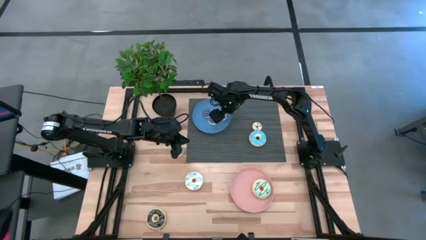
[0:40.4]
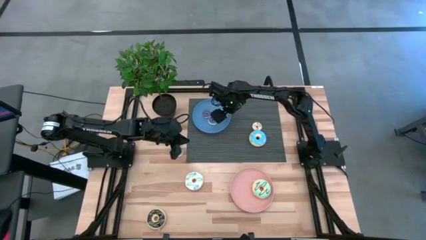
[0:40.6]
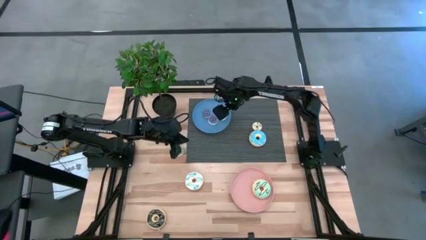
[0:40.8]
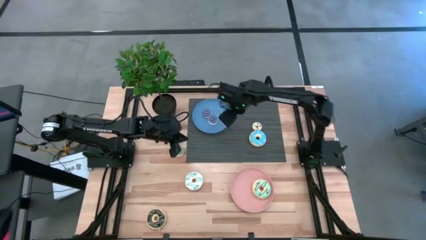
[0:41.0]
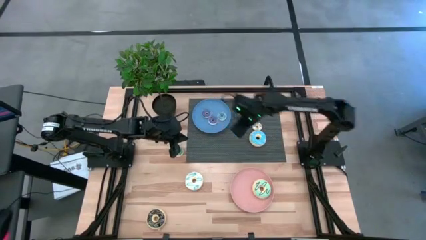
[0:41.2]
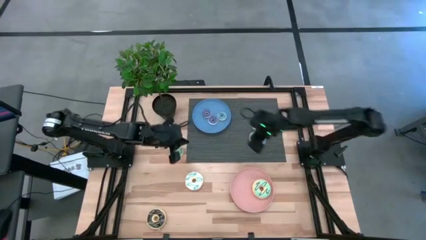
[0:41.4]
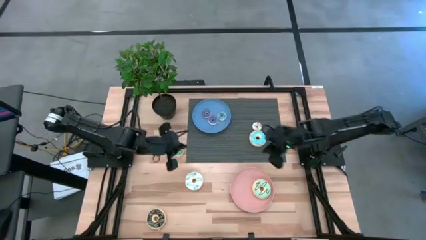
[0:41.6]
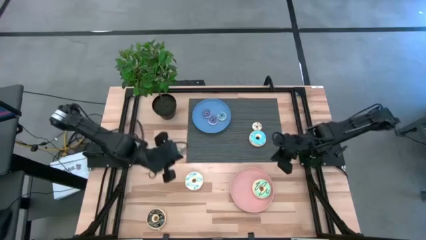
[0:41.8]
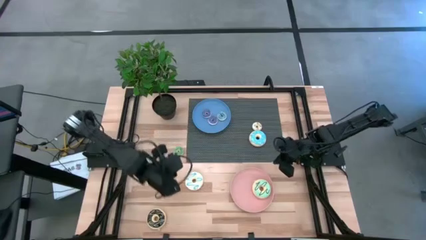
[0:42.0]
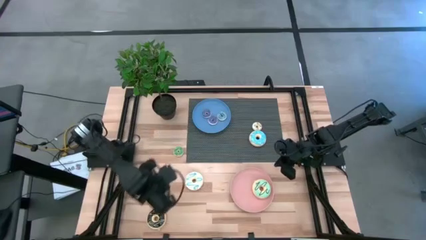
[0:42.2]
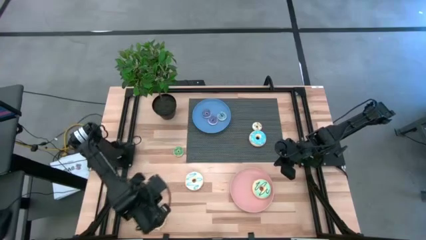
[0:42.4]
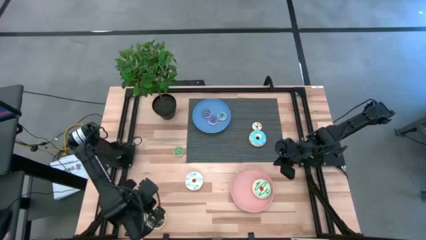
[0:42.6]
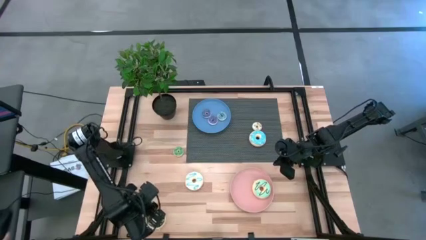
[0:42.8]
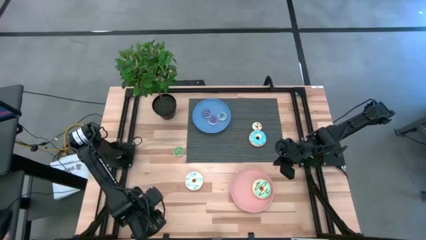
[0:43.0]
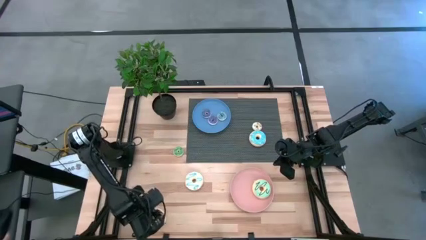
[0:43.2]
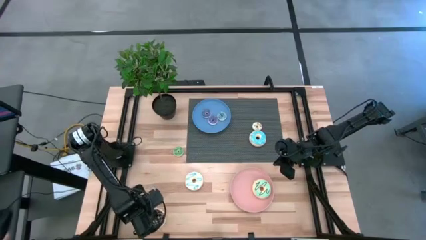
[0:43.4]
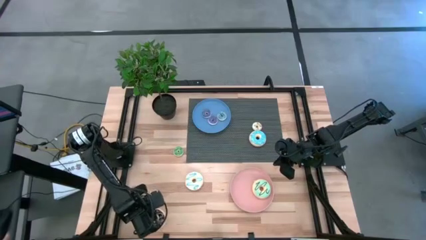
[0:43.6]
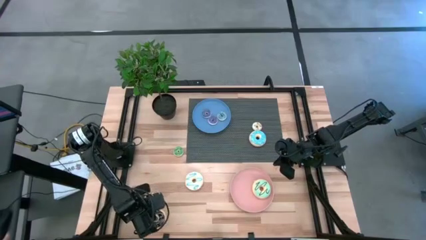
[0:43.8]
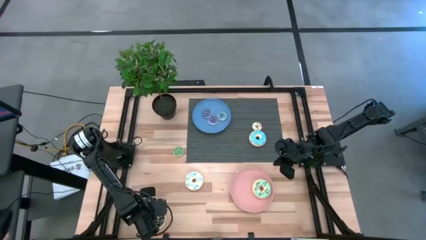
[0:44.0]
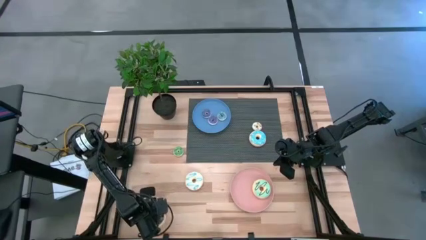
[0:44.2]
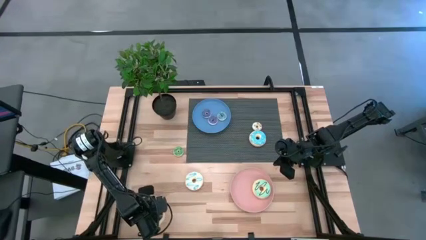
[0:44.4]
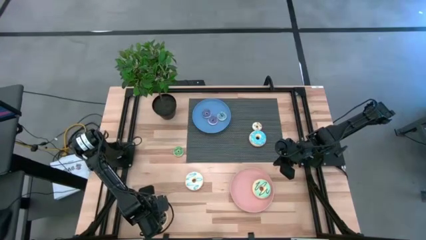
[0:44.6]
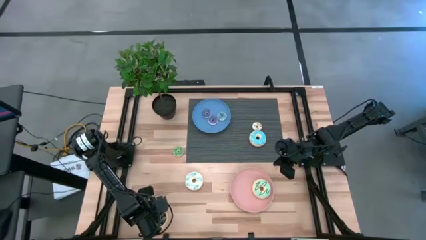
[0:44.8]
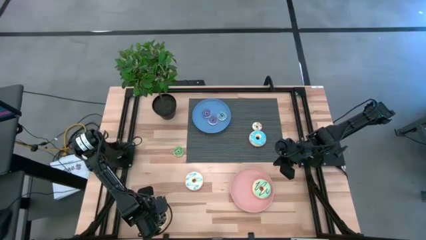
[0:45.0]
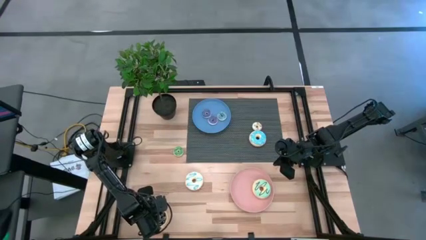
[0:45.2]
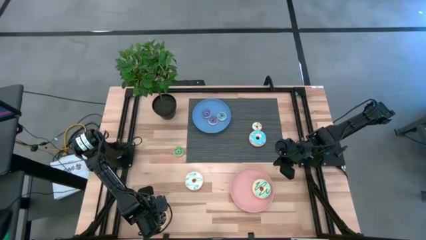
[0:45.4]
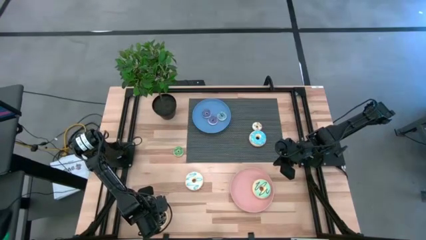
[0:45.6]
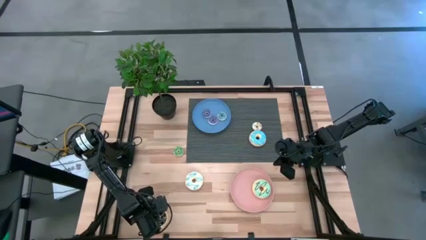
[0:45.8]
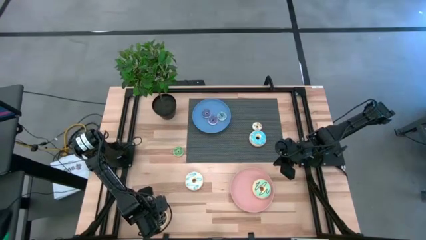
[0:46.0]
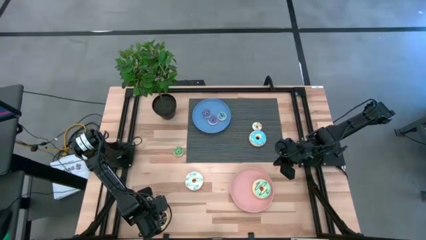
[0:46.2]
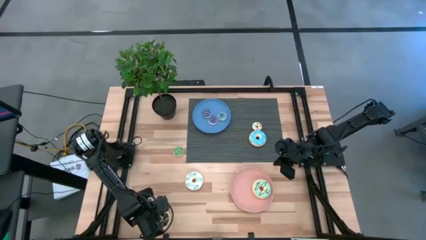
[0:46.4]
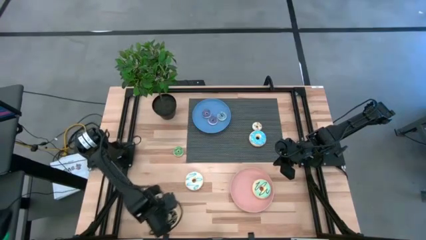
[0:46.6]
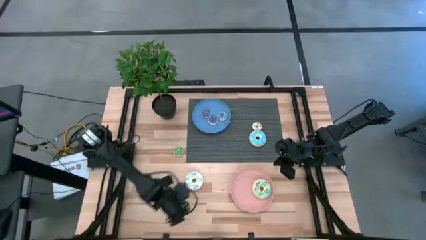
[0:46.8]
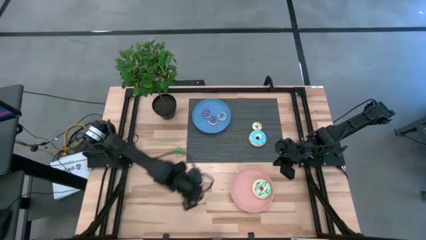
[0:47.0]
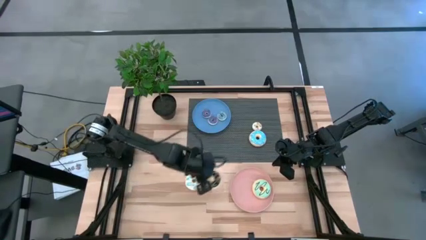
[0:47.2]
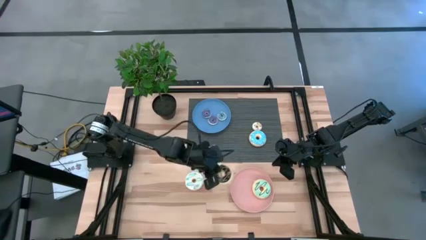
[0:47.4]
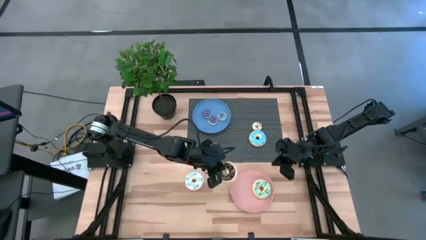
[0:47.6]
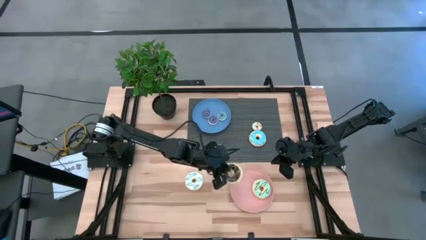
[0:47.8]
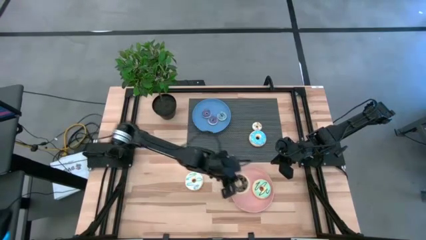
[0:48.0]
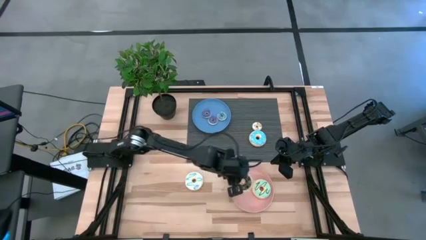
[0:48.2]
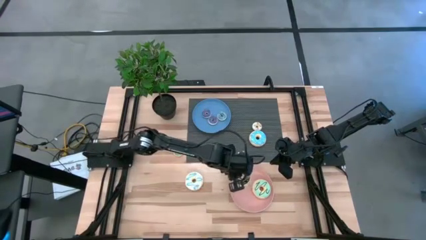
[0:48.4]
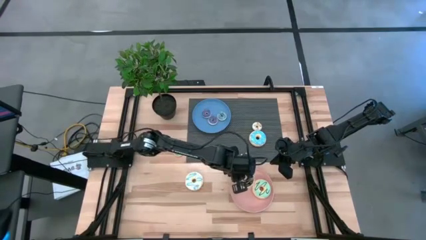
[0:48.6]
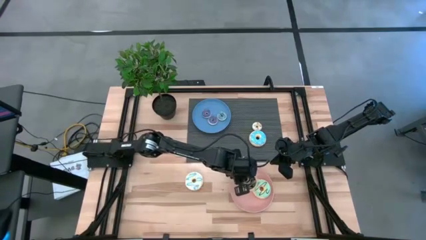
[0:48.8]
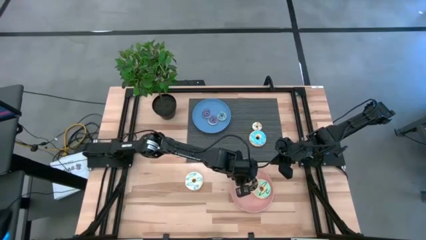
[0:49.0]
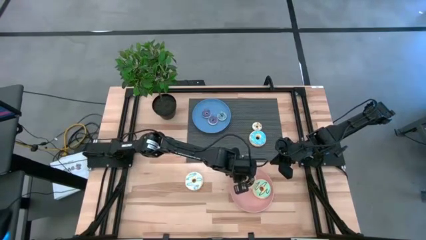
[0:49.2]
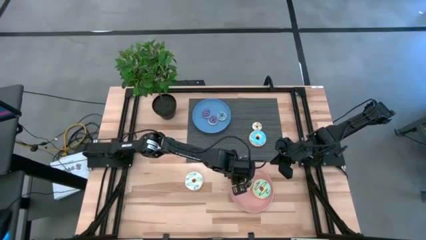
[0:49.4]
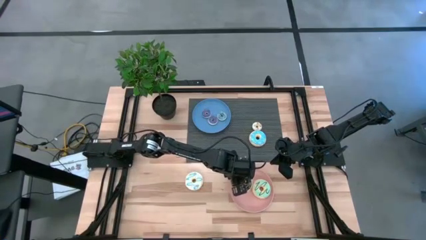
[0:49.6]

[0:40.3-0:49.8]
Task: Pick & Place donuts
Put the big black donut into the pink plate

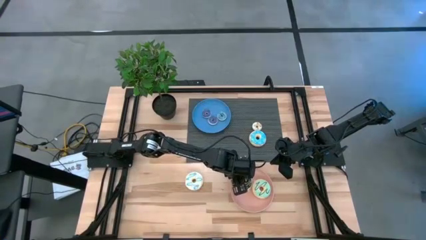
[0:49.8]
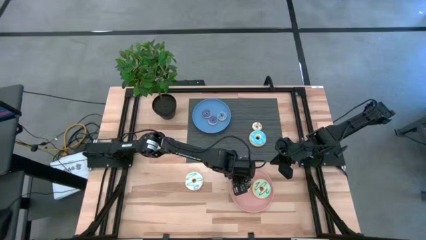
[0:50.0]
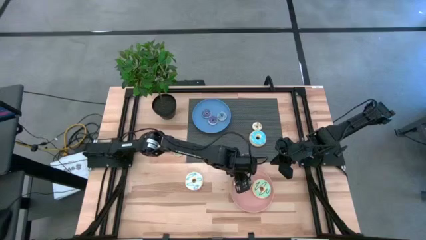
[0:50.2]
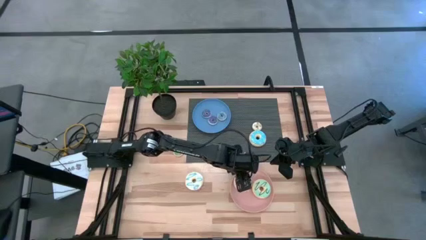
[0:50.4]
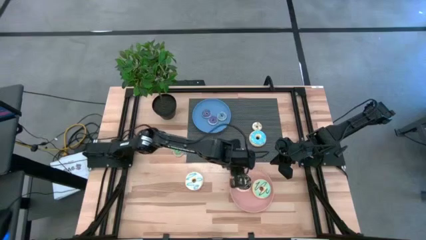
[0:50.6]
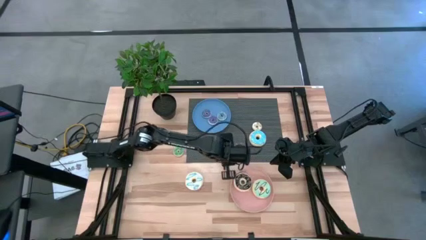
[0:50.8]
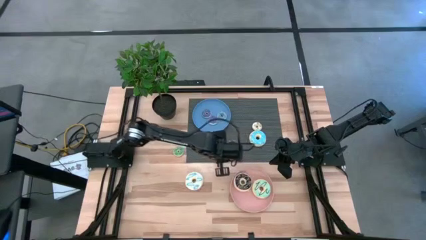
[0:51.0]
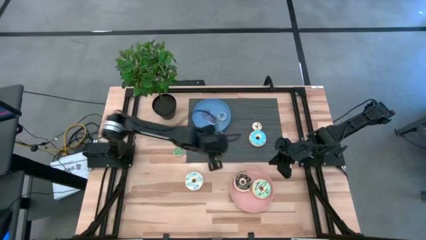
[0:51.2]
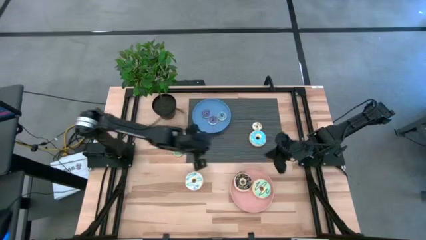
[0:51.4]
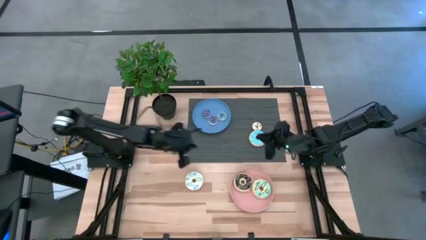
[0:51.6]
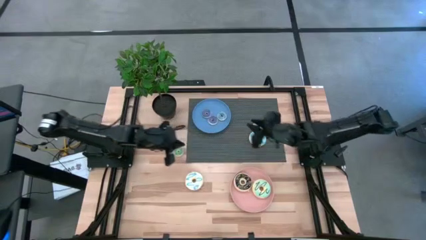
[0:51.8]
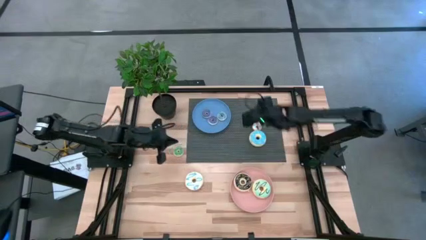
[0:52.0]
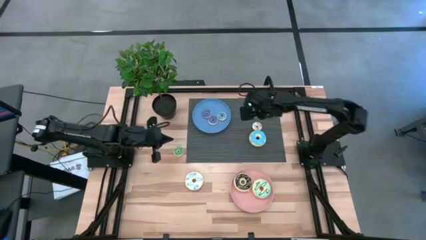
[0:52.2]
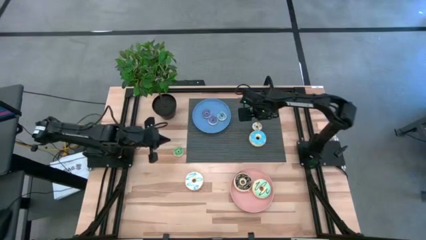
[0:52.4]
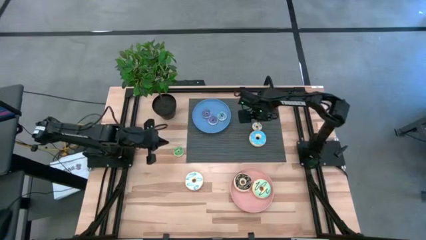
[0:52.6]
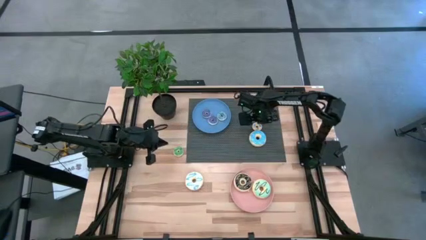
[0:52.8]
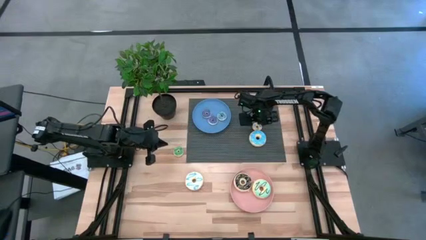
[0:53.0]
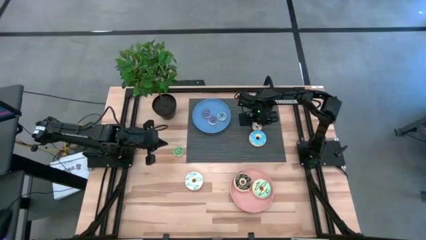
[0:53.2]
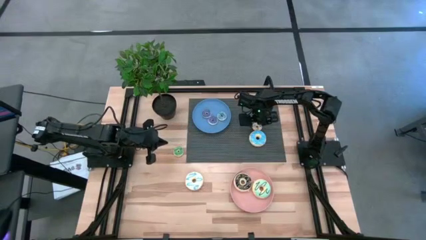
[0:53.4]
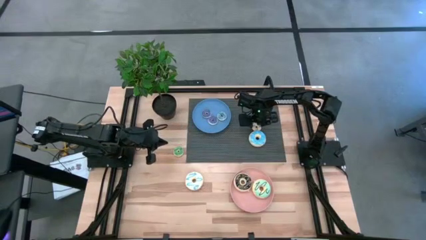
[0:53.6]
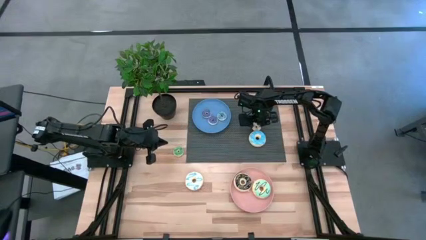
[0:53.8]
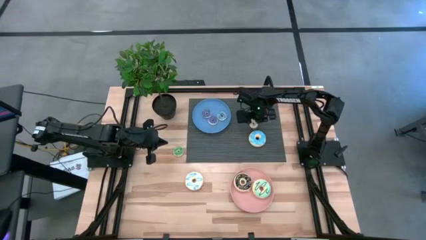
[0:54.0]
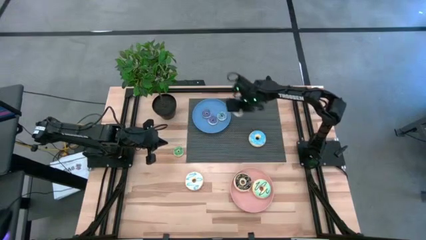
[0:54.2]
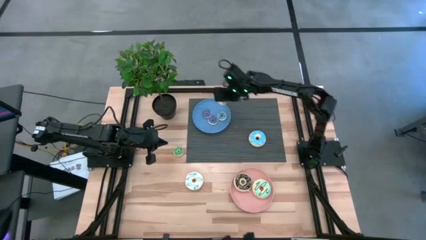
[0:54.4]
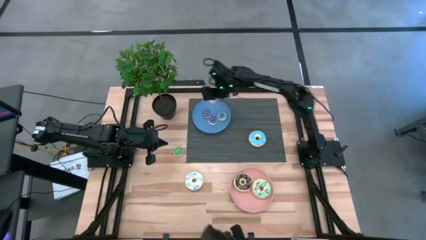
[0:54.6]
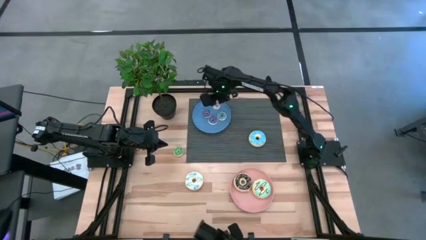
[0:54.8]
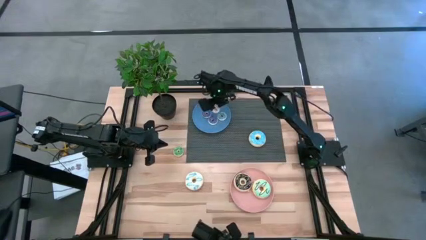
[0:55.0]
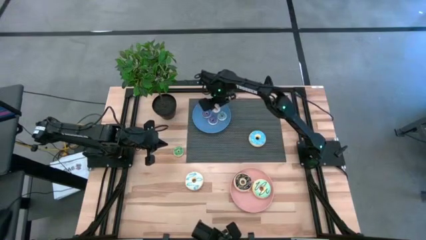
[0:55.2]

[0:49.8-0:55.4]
Put the small white donut into the blue plate
